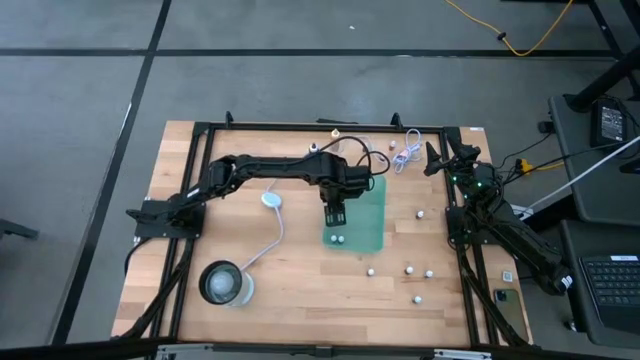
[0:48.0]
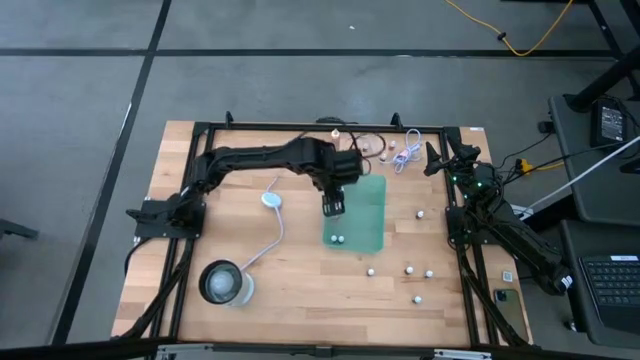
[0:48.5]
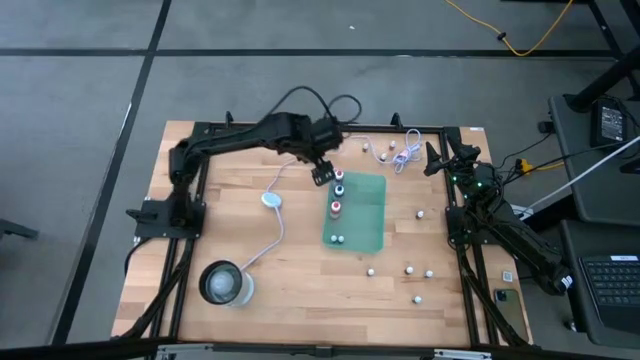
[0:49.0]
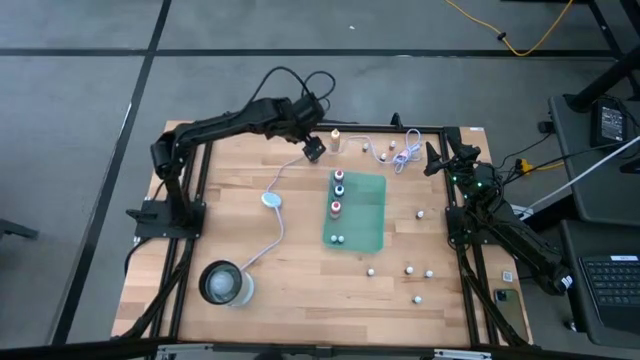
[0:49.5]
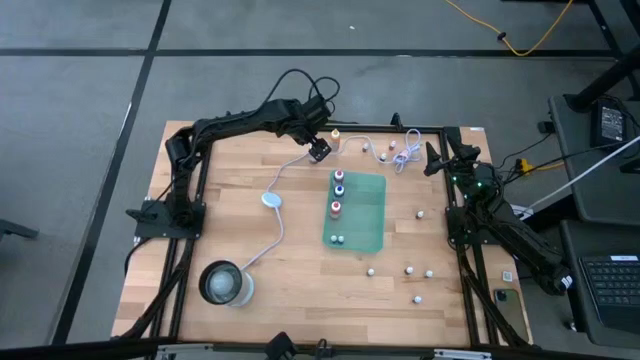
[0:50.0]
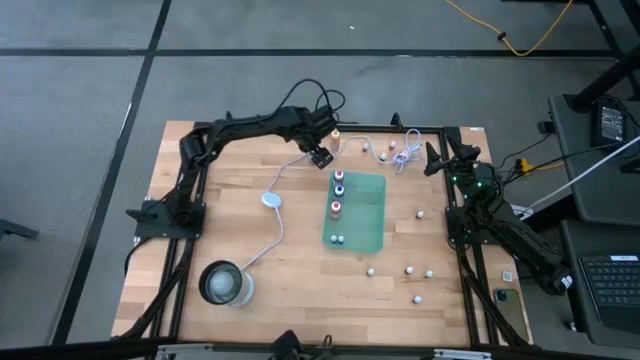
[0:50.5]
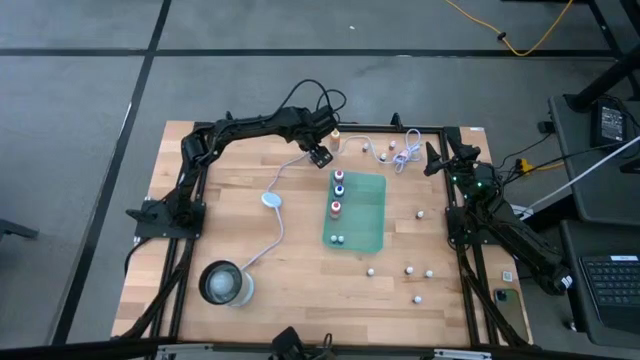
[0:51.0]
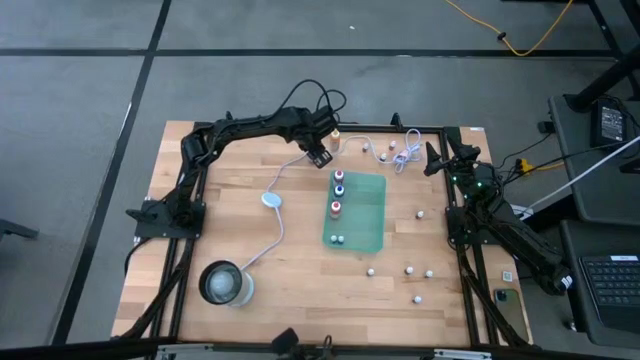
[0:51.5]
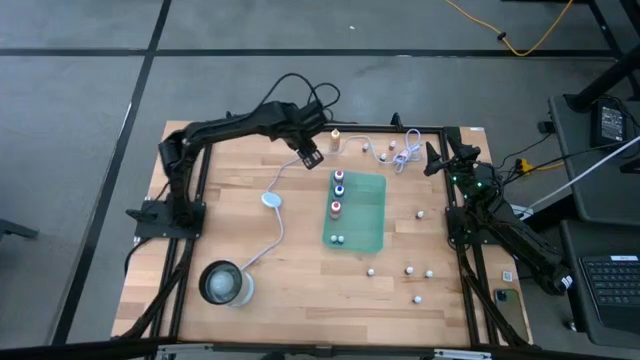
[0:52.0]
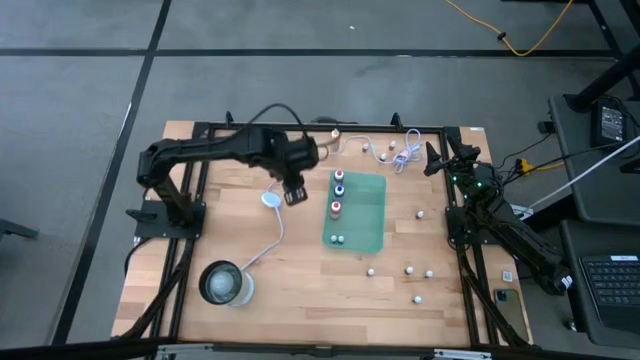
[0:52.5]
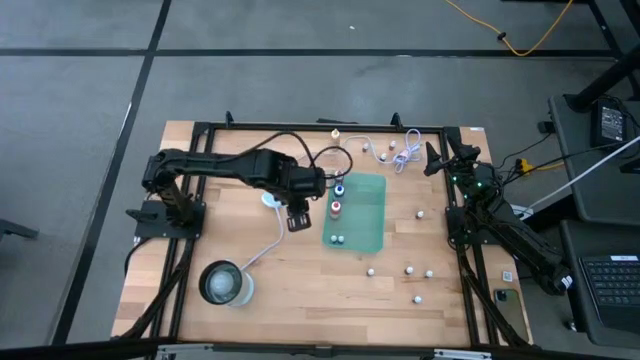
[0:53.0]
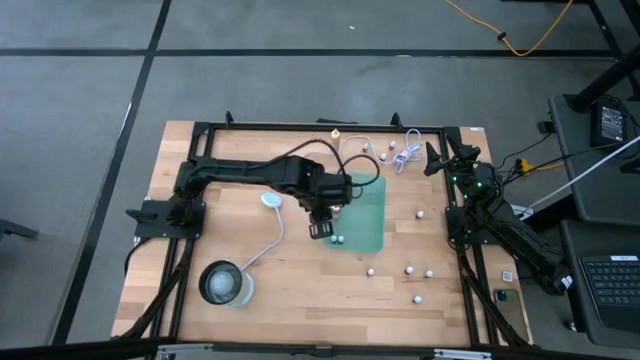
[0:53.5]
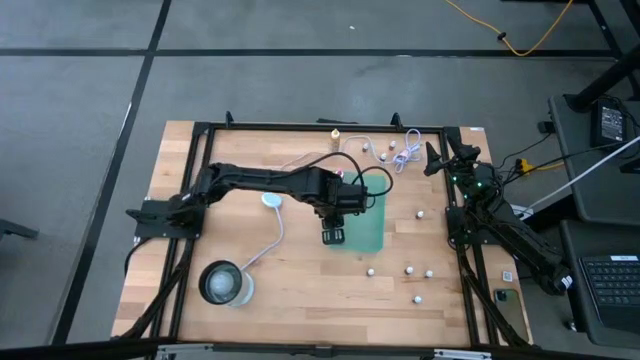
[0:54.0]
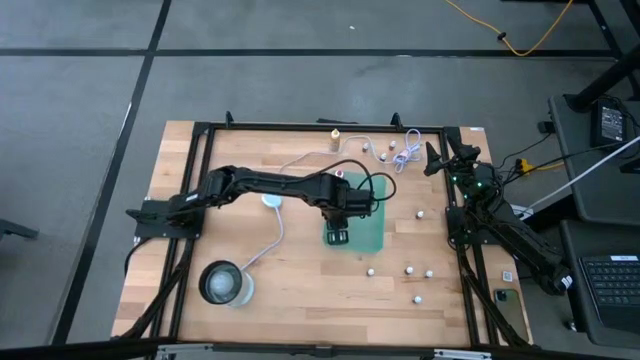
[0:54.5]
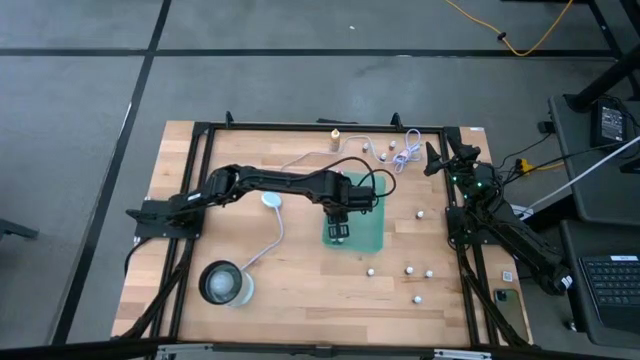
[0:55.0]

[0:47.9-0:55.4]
Task: Pick & Place food coloring
Put the big violet food coloring bottle into the green bin

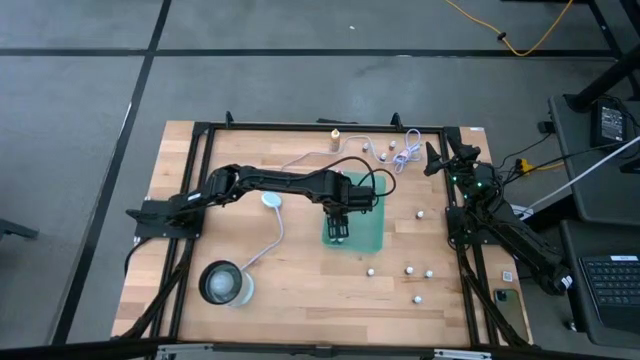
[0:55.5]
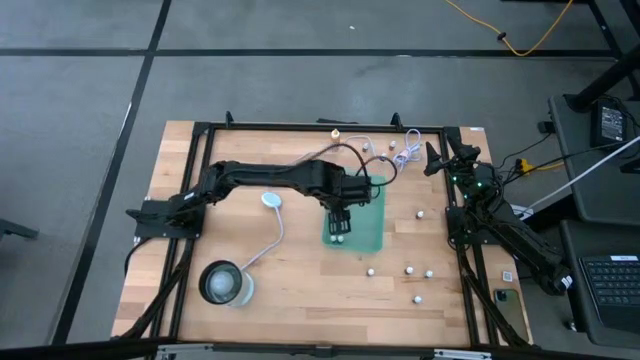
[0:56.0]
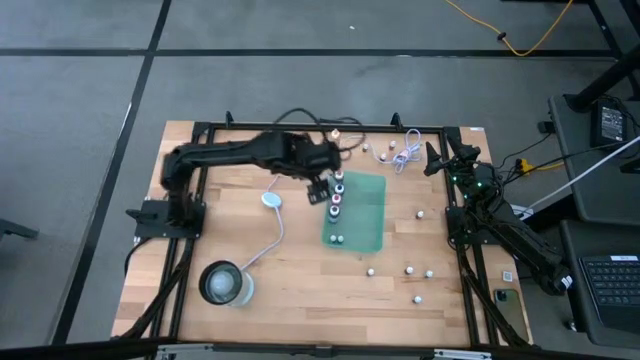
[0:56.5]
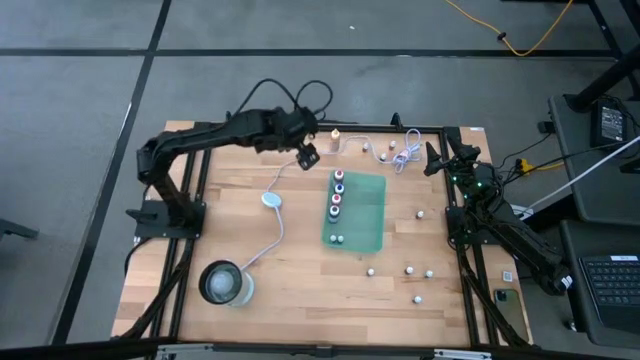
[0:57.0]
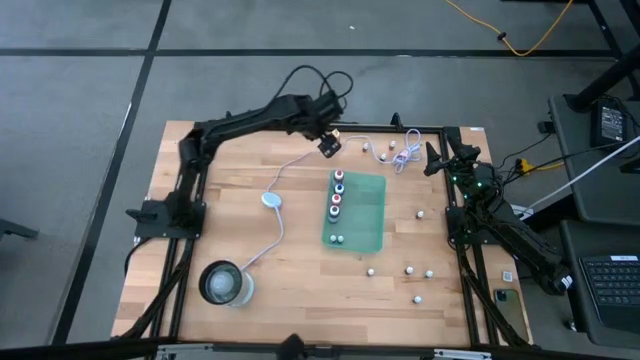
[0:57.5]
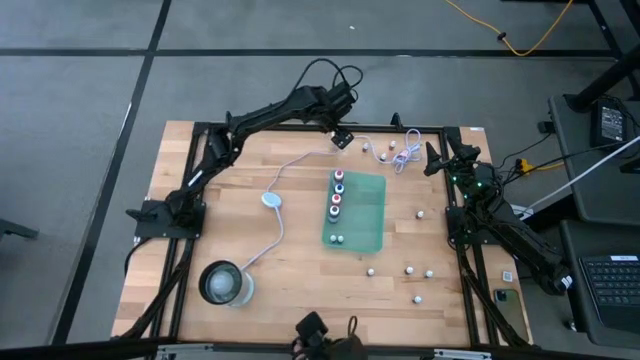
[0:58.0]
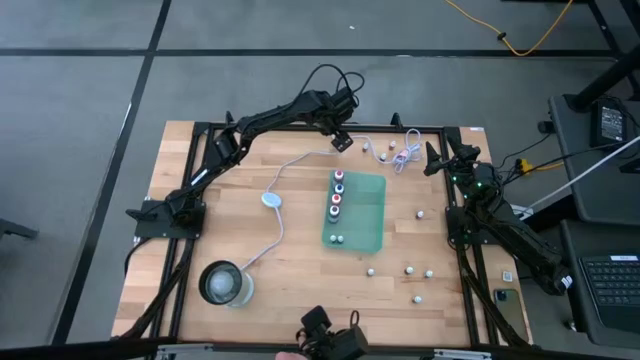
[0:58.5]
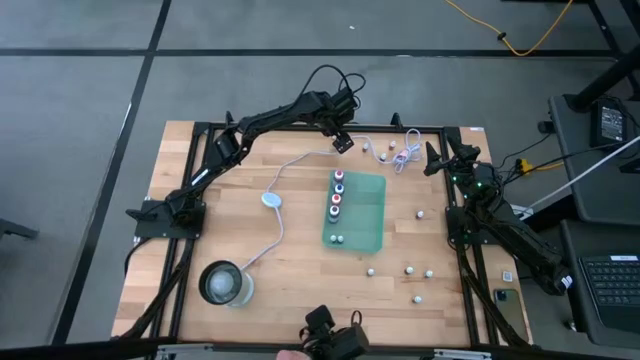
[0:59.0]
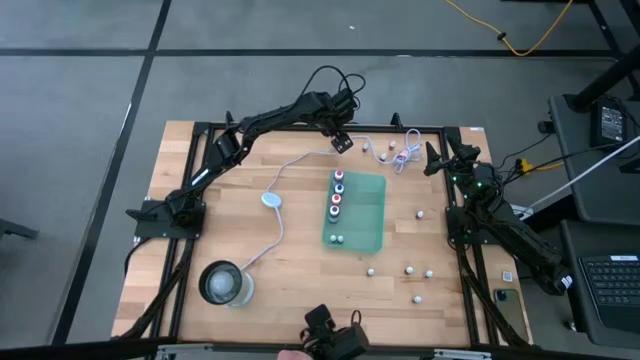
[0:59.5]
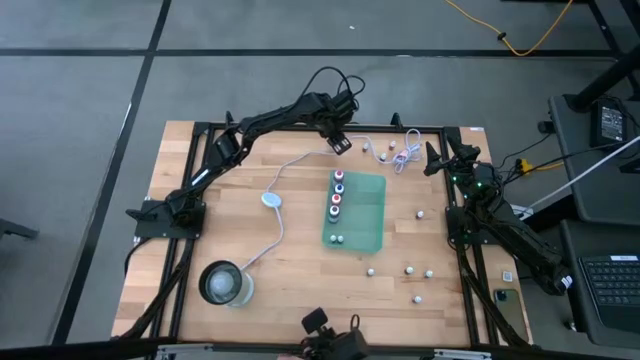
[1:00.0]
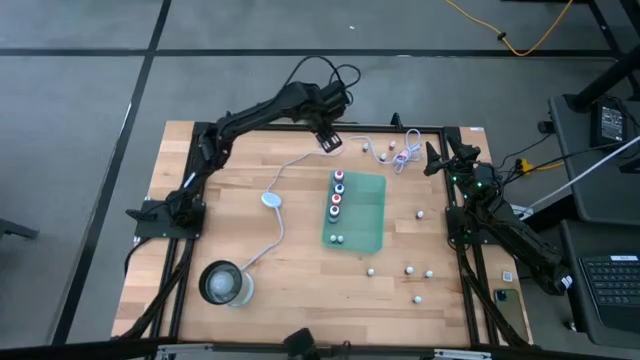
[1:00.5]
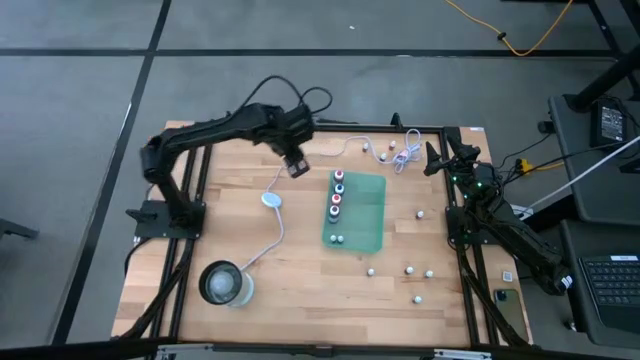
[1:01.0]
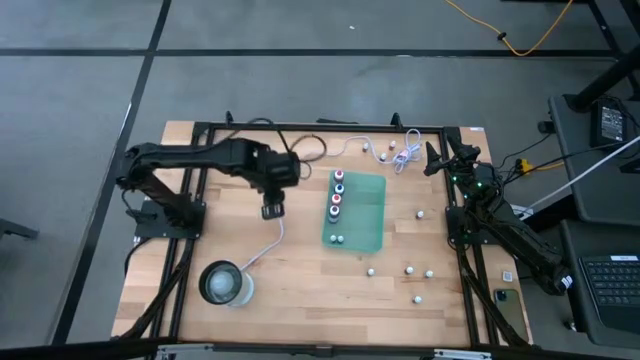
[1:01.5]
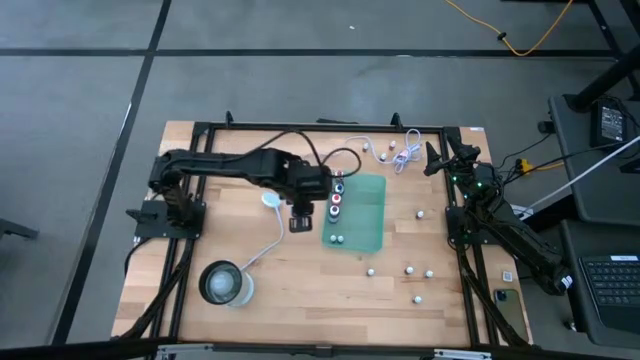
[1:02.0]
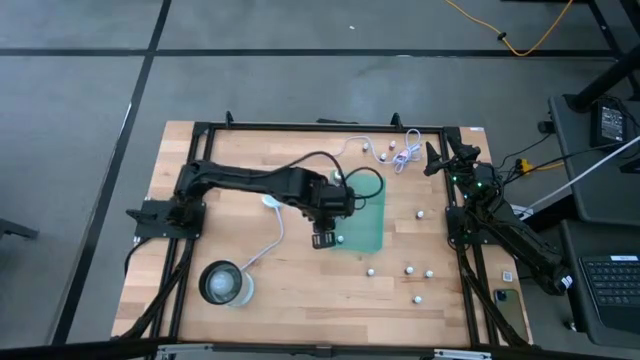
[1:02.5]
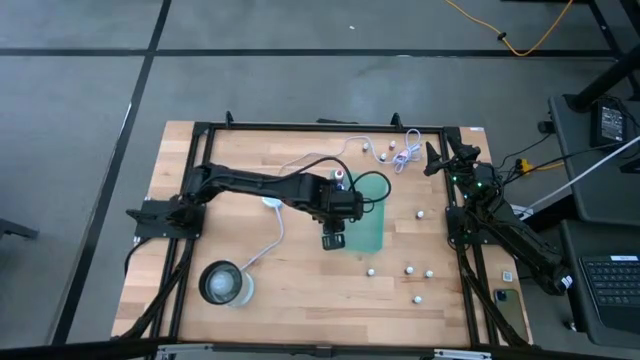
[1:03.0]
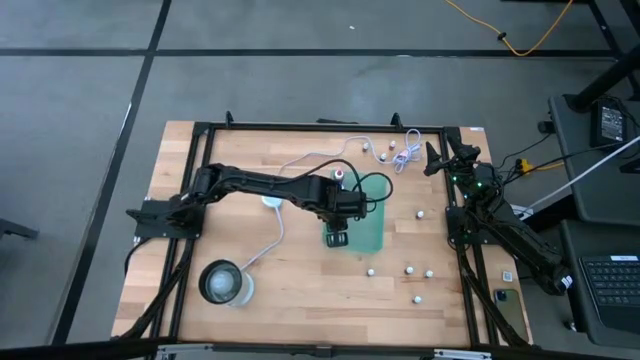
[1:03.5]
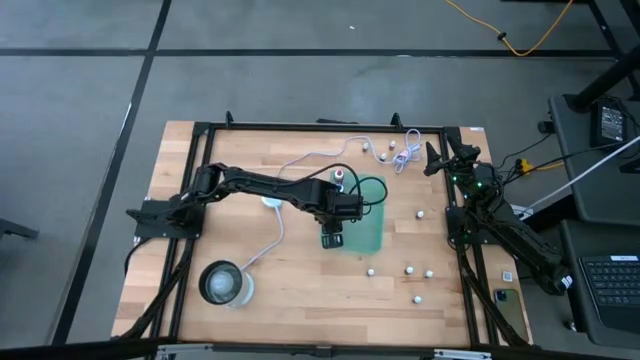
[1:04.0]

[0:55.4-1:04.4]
Put the big yellow food coloring bottle into the green bin

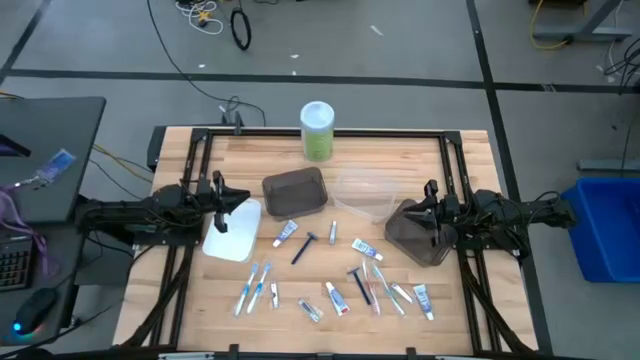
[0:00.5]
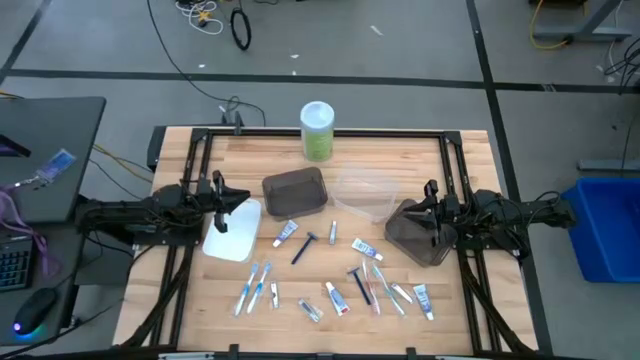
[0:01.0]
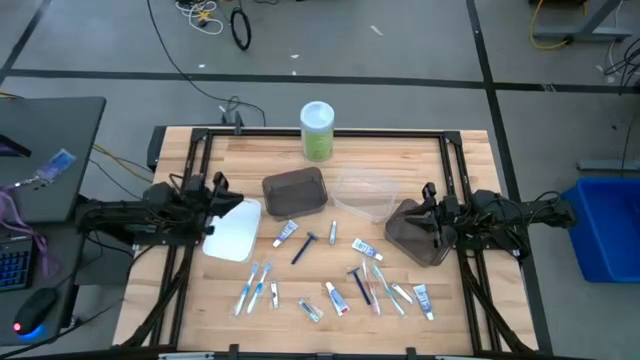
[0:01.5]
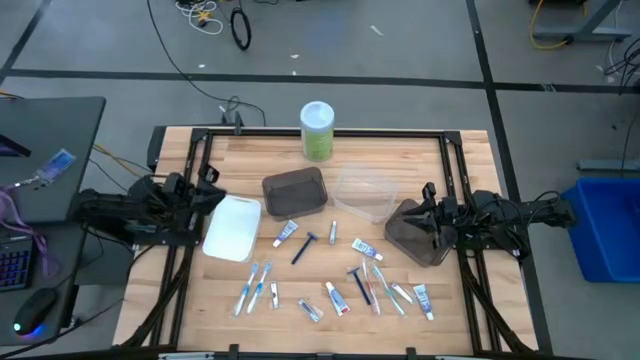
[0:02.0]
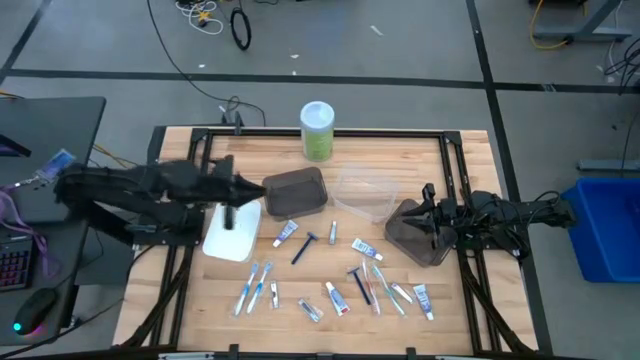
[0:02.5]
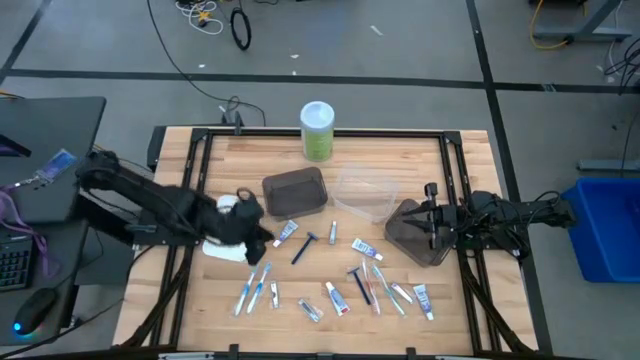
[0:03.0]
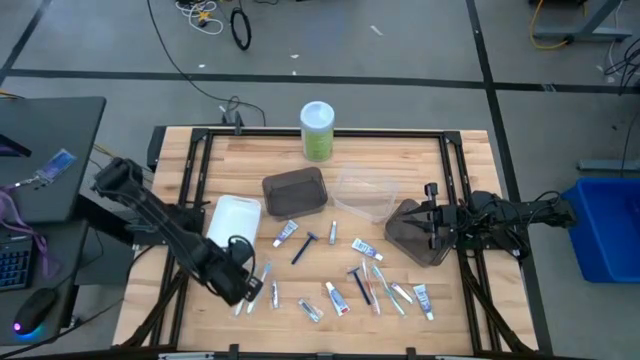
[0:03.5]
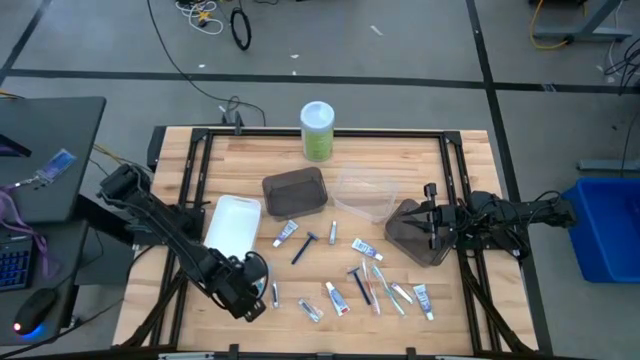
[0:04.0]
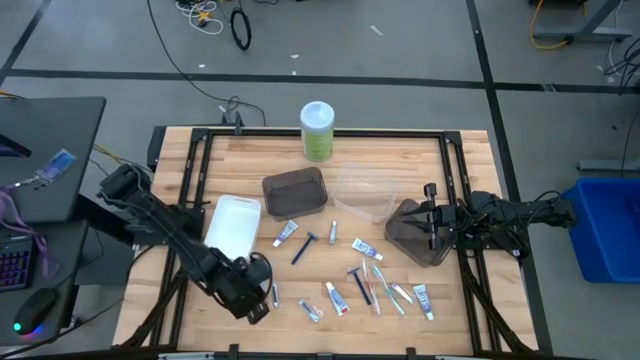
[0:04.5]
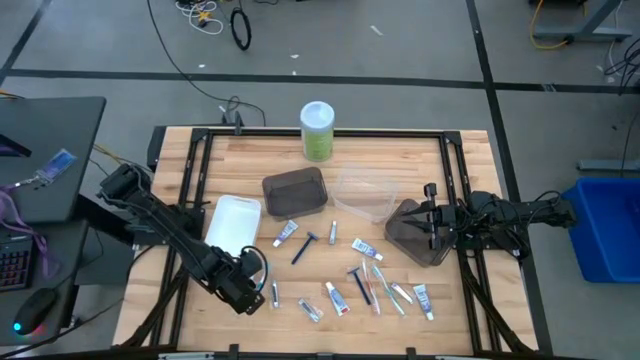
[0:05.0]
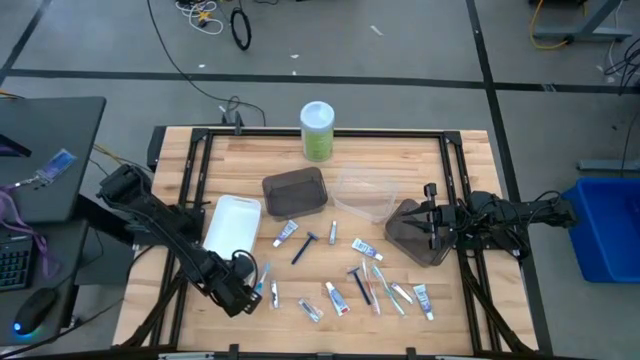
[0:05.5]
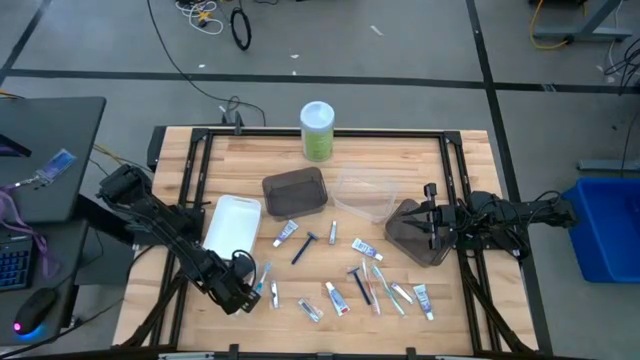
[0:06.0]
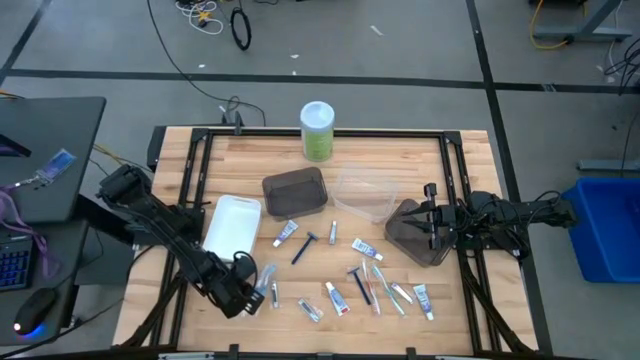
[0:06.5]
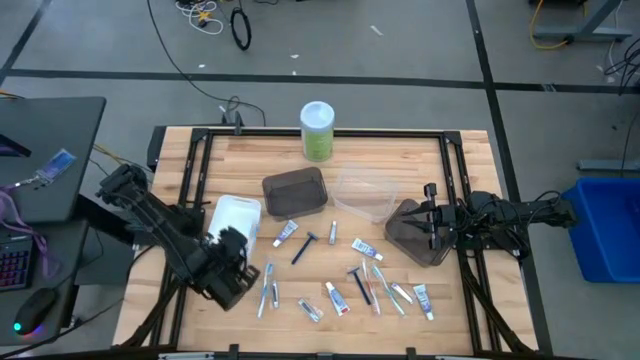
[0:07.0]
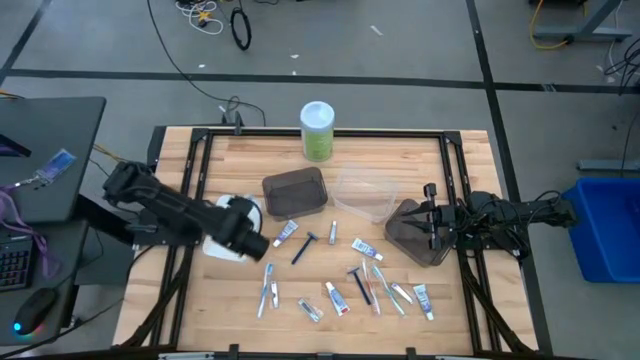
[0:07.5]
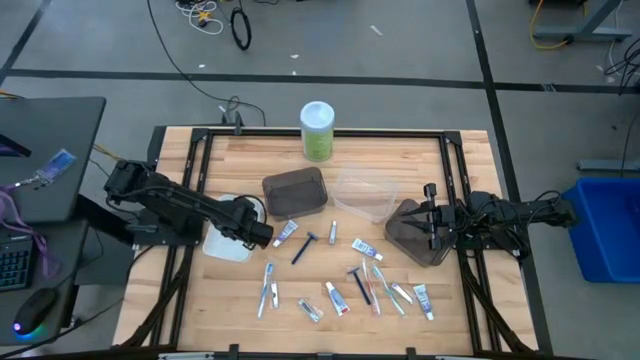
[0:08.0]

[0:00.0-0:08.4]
Task: Pick & Place Travel size toiletries
Put the blue toothbrush into the white bin
